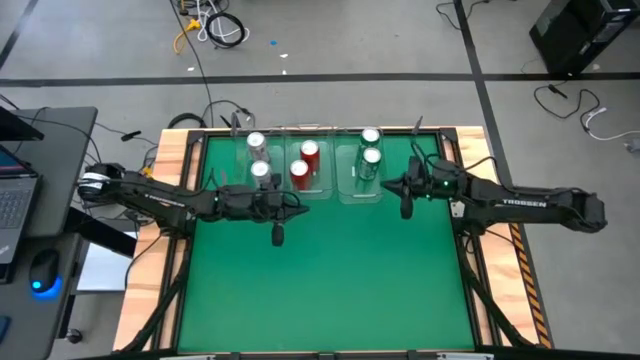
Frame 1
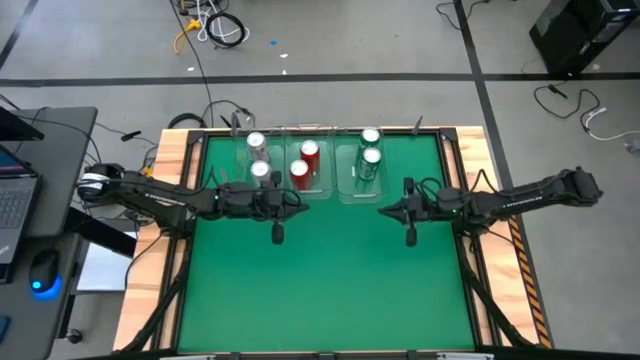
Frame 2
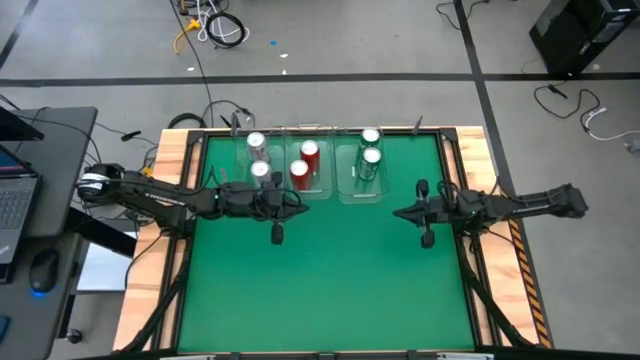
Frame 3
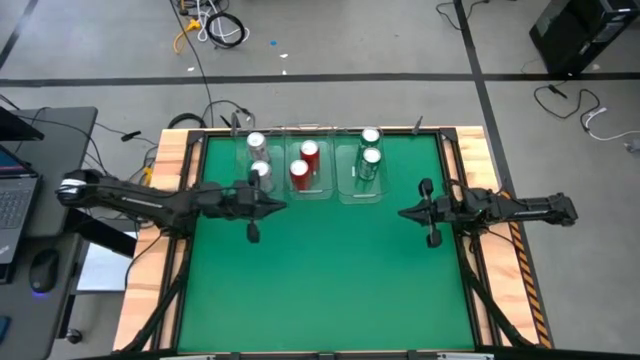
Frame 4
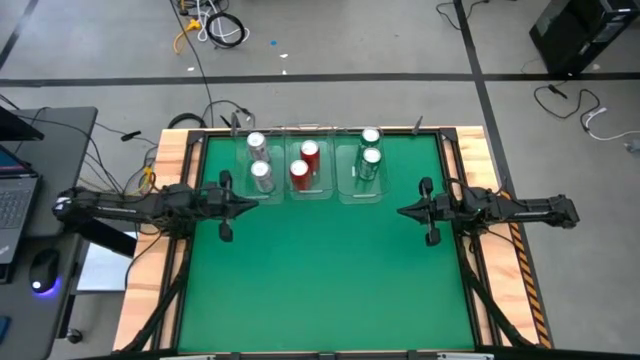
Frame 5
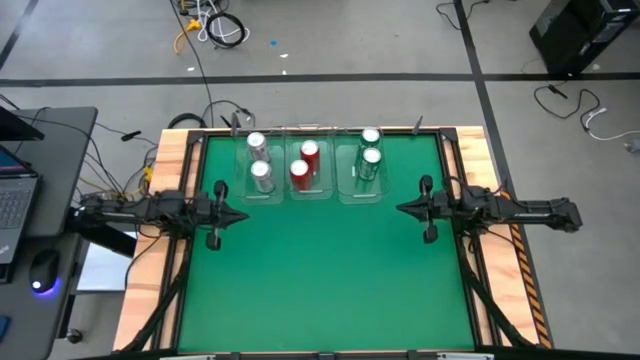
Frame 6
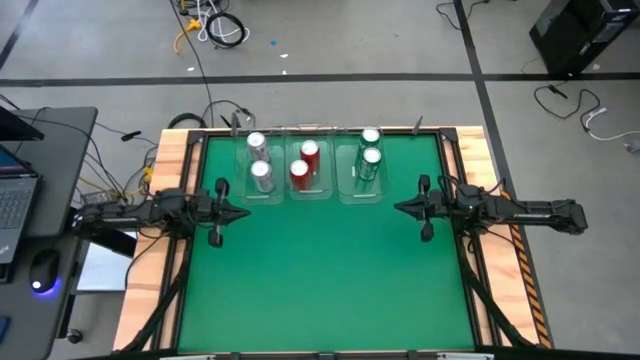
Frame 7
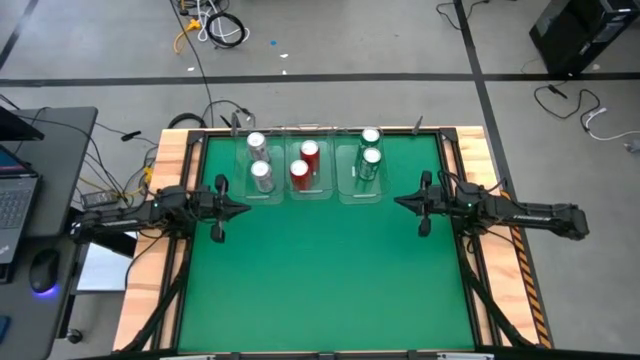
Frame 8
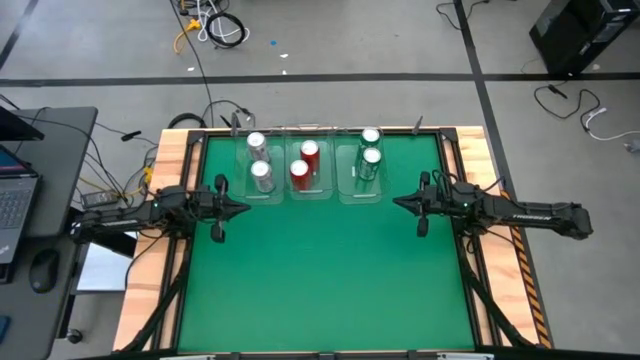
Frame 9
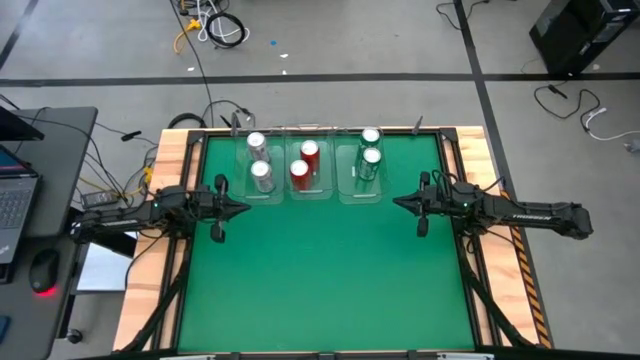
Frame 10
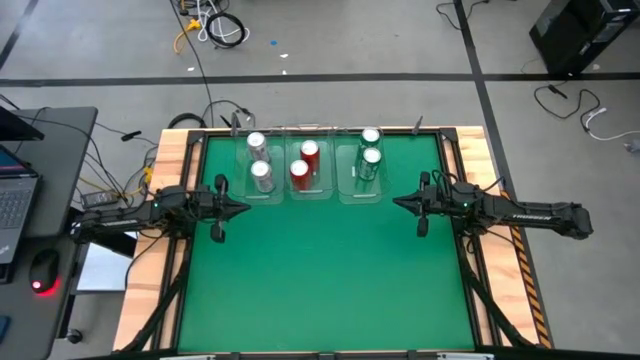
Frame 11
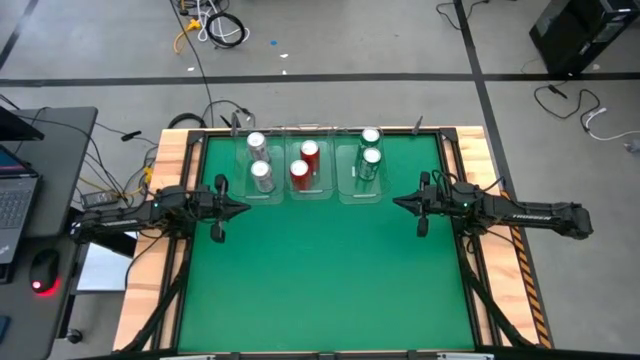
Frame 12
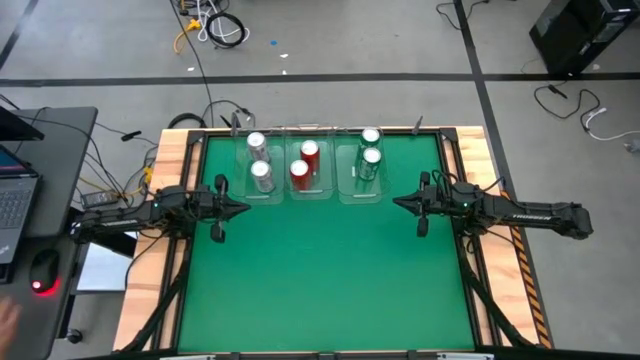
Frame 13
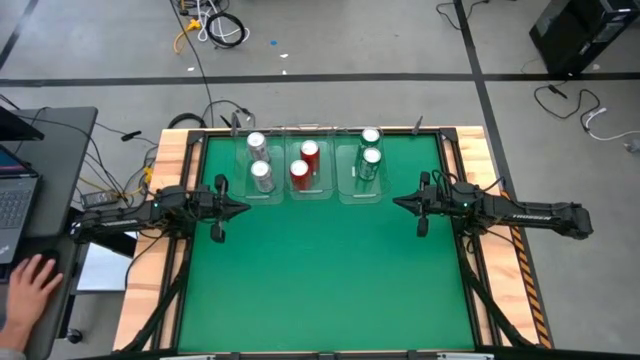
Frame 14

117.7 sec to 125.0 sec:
Task: Sort soda cans
Return to Home Position

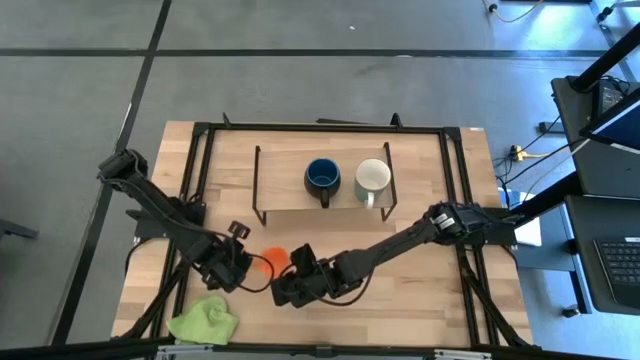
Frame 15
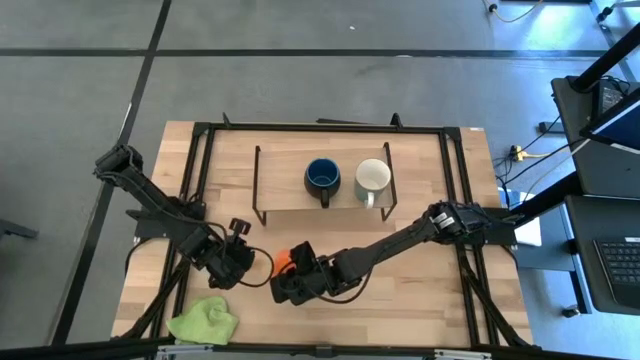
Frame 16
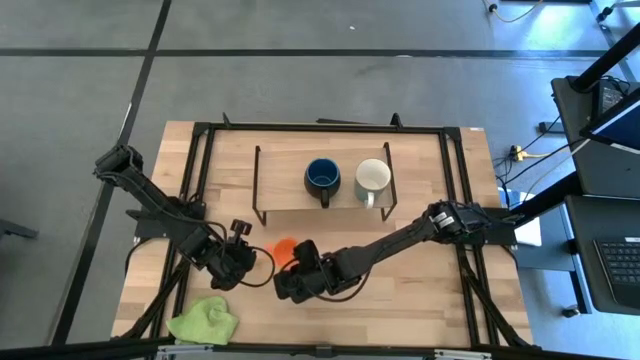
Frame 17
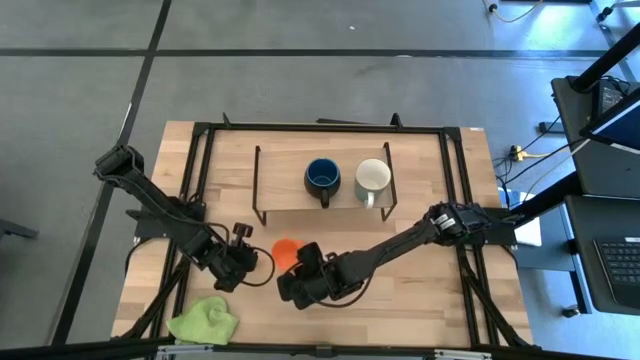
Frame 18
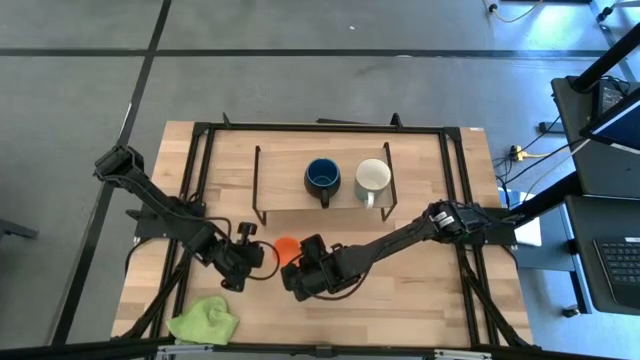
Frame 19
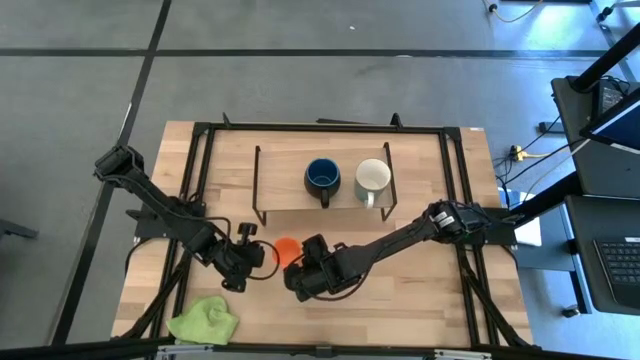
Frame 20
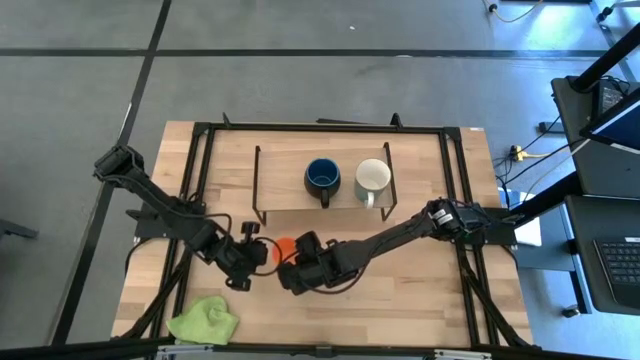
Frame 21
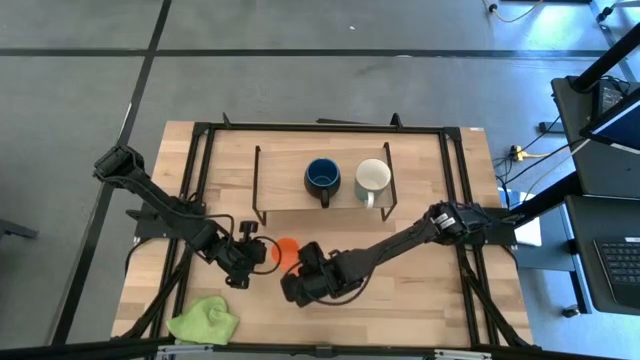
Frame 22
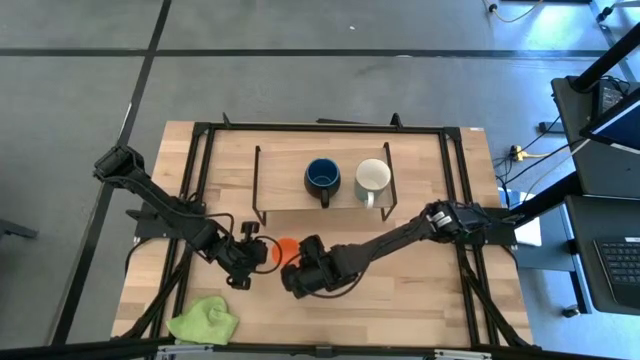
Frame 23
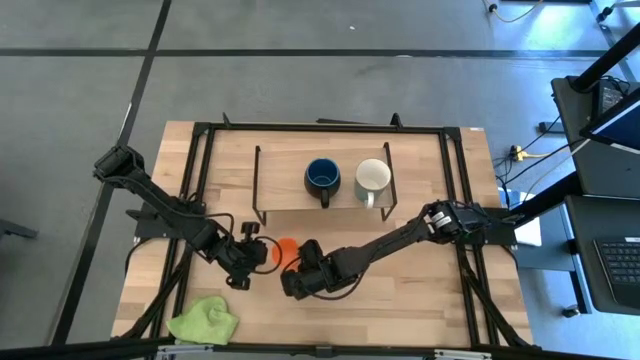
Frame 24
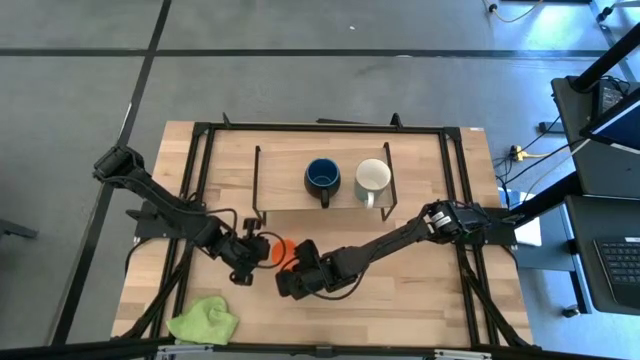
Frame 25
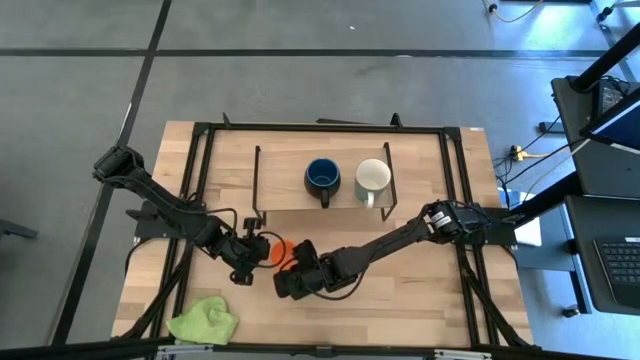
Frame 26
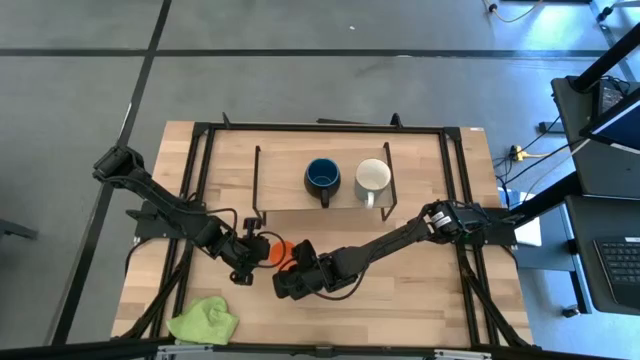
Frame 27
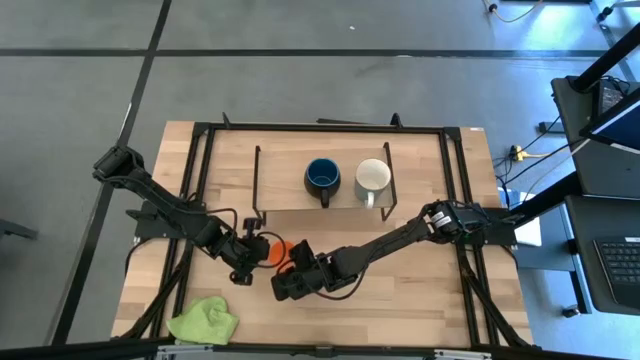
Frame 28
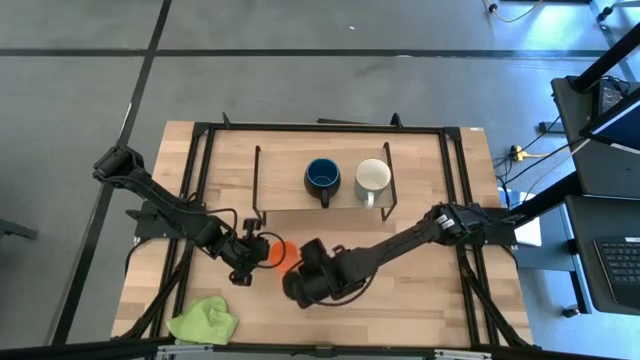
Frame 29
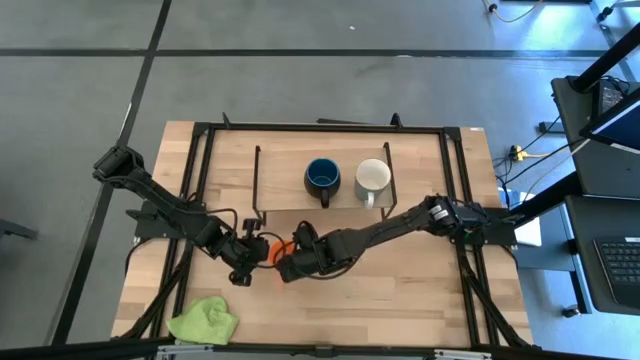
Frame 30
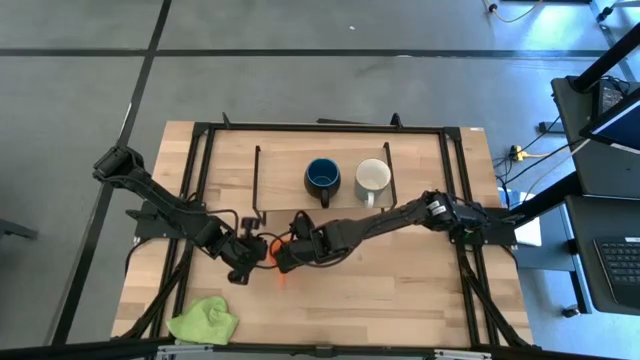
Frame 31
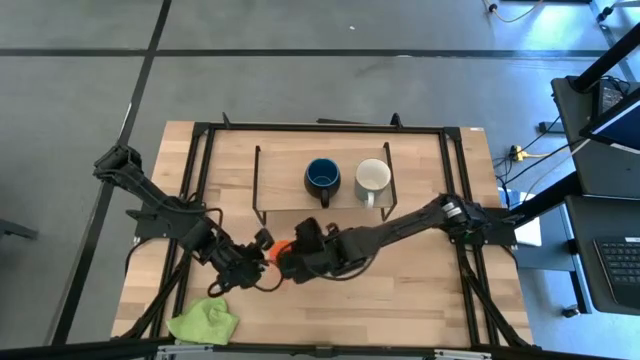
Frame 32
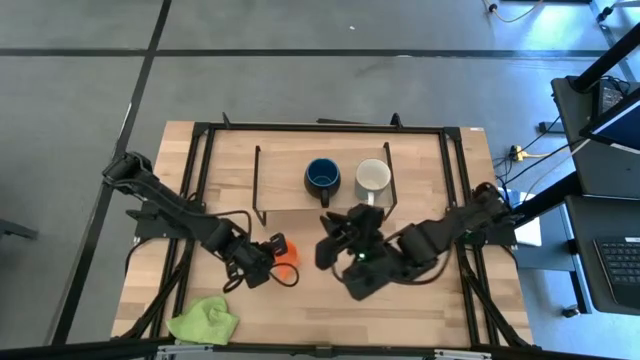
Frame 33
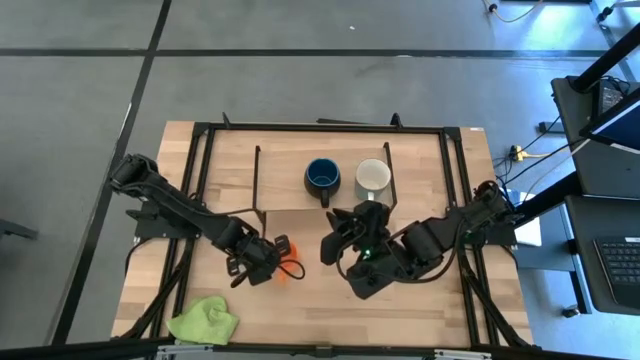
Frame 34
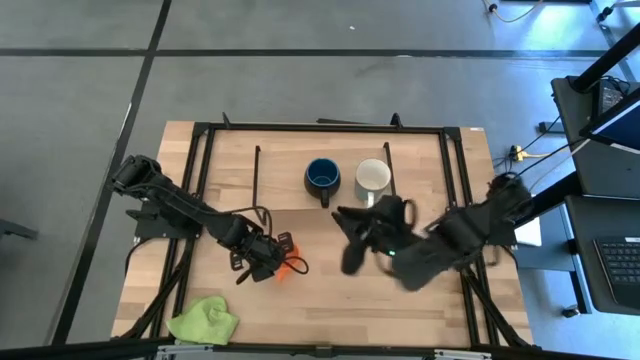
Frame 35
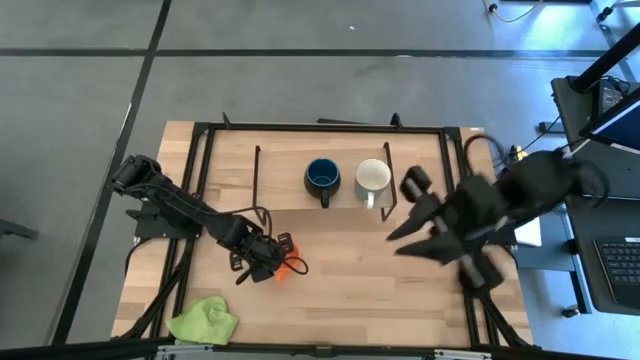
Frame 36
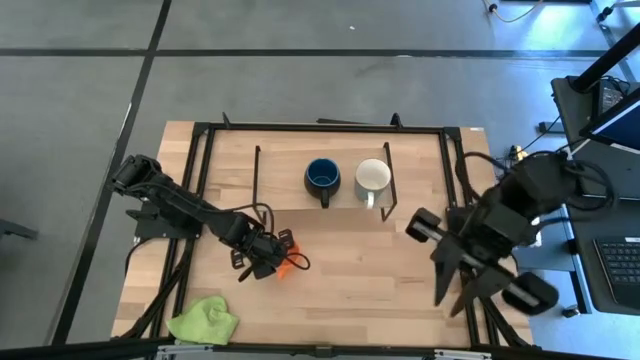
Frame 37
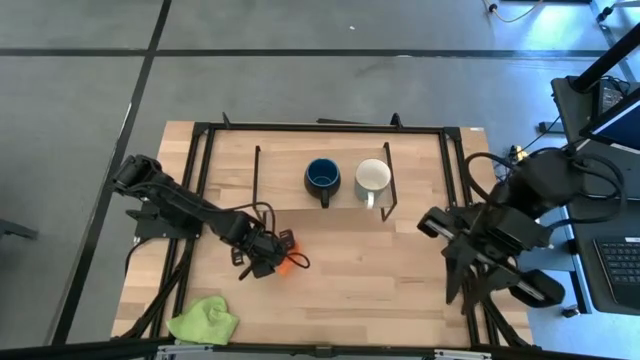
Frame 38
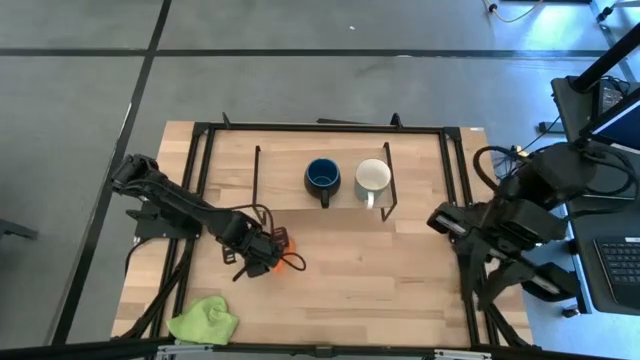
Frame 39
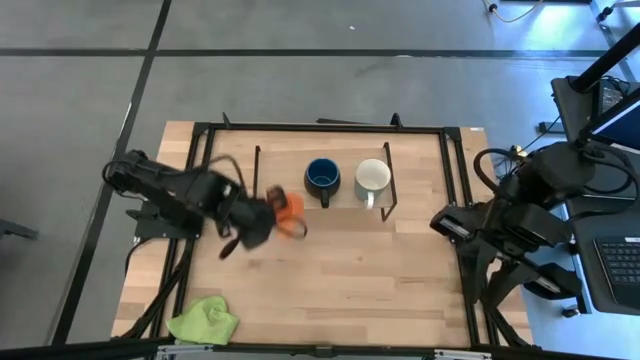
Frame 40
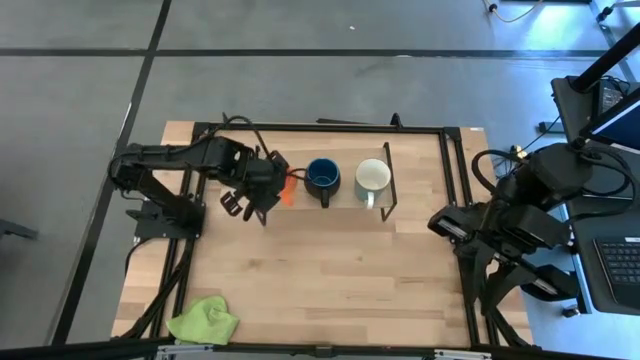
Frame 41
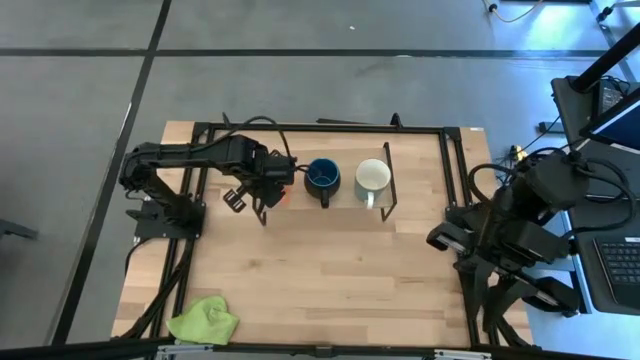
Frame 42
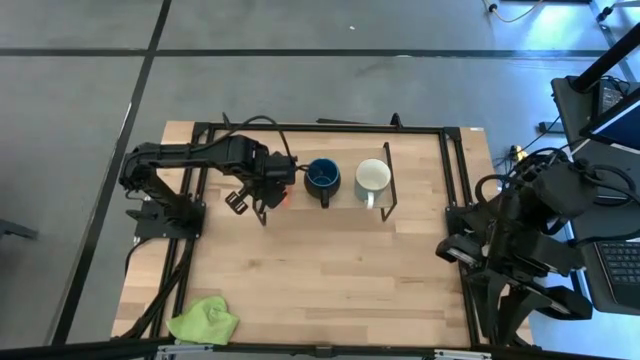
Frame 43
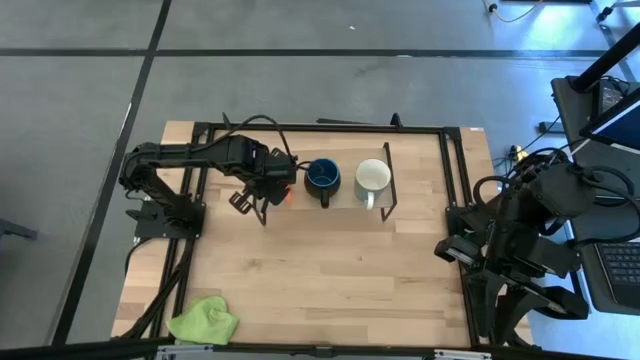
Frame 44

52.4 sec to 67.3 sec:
Task: Stack small to large cups/mugs on shelf
Put the orange mug on the shelf
